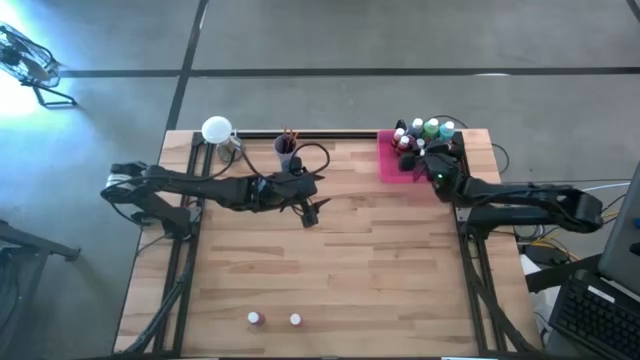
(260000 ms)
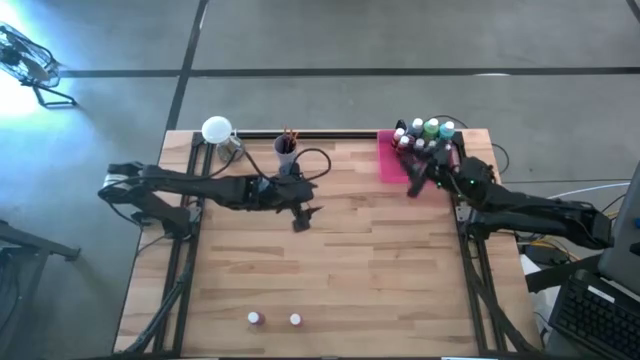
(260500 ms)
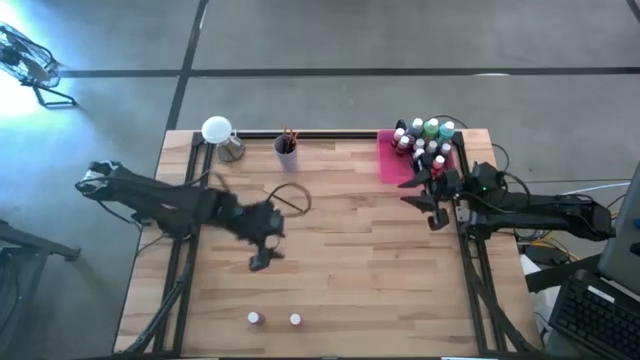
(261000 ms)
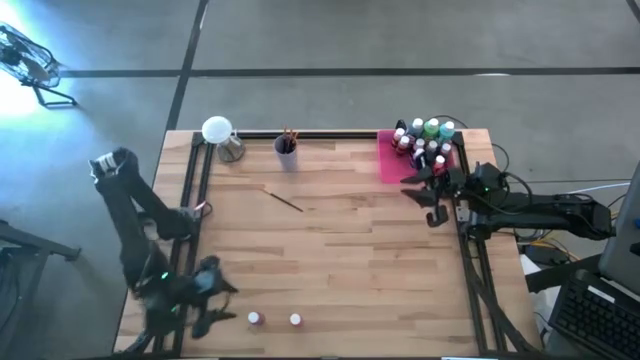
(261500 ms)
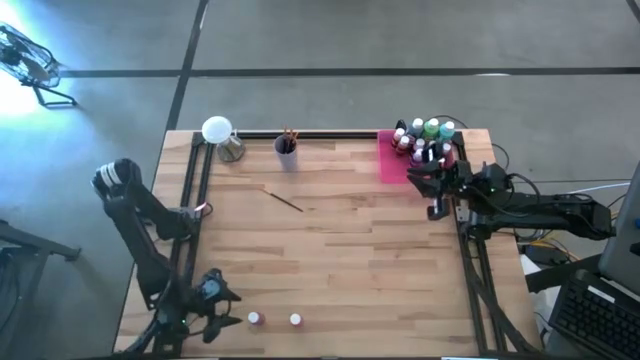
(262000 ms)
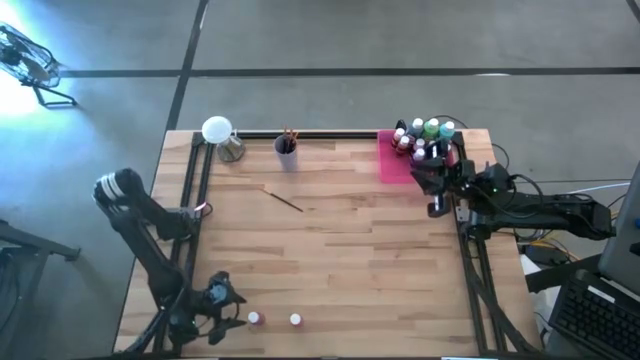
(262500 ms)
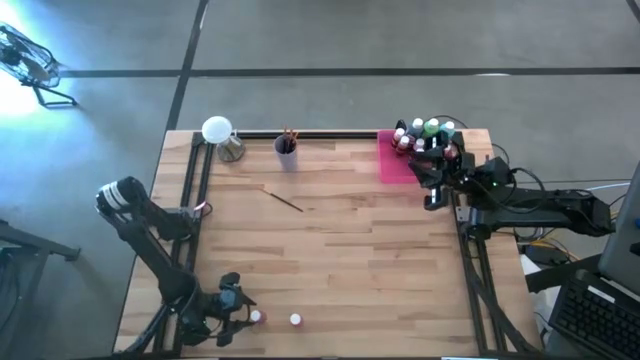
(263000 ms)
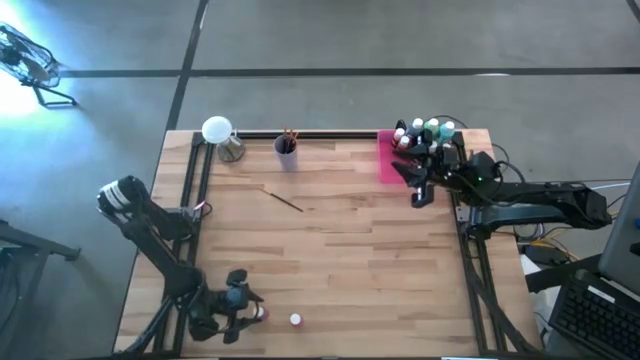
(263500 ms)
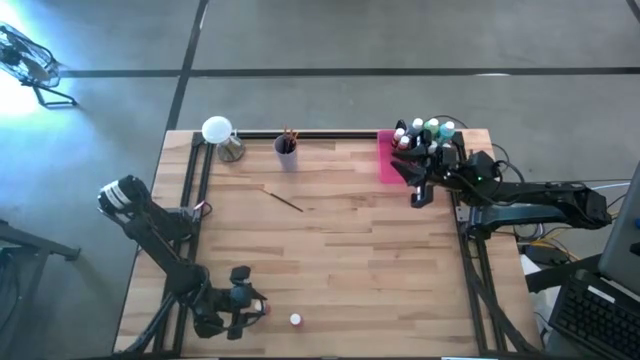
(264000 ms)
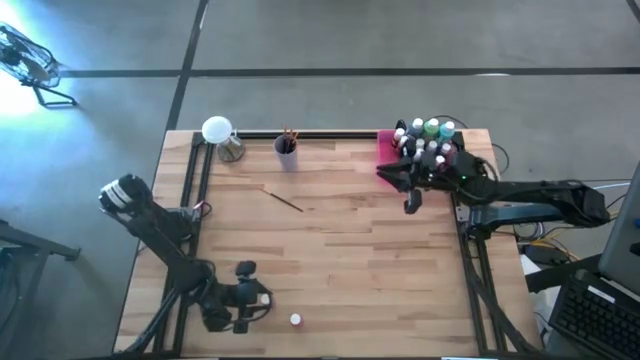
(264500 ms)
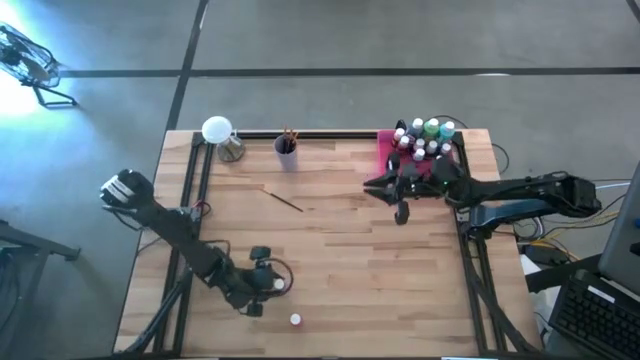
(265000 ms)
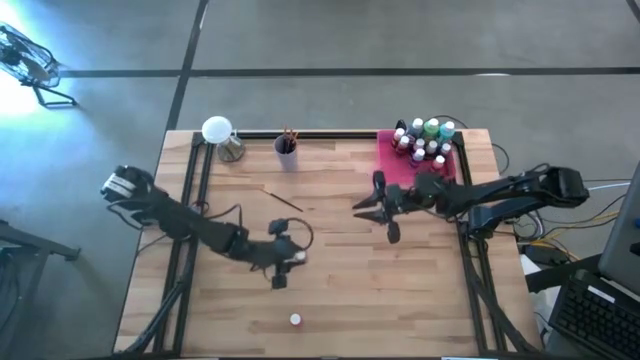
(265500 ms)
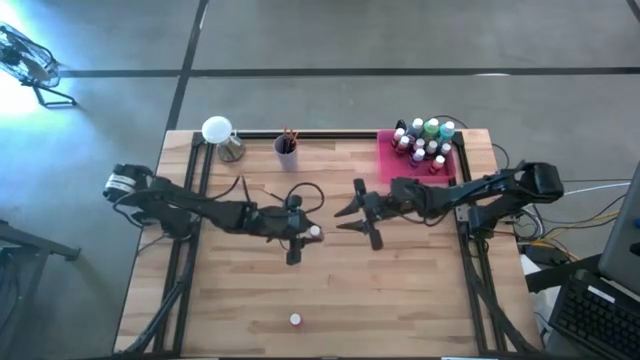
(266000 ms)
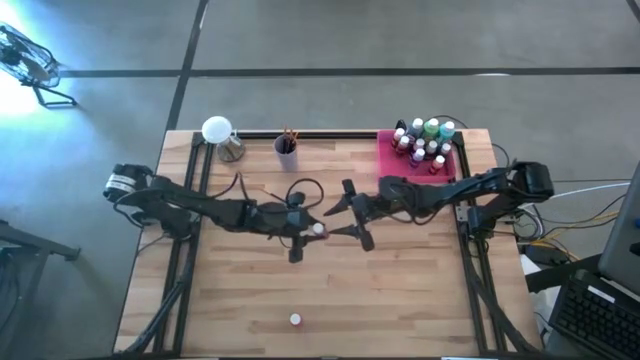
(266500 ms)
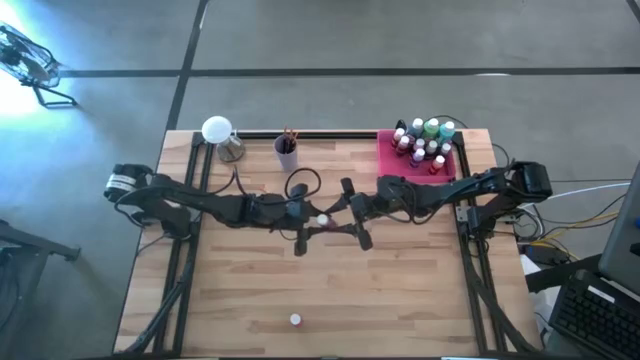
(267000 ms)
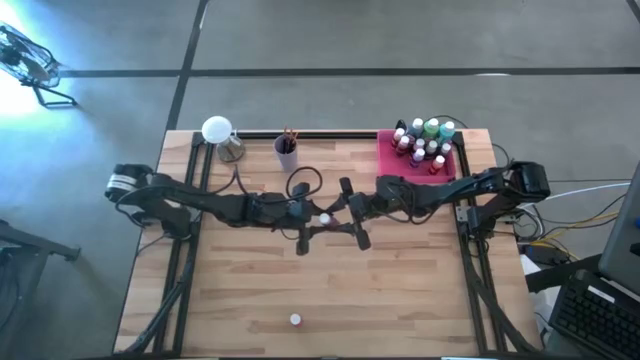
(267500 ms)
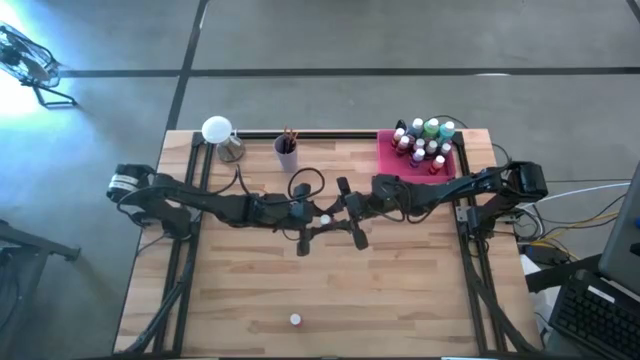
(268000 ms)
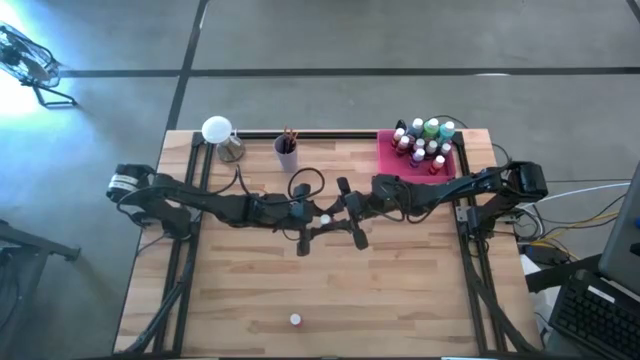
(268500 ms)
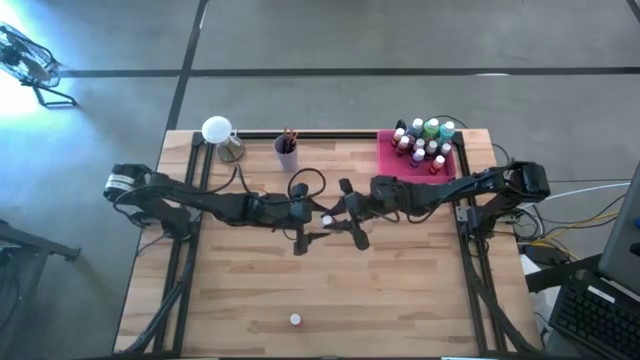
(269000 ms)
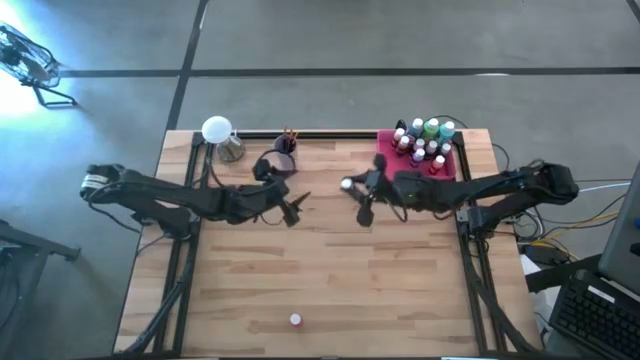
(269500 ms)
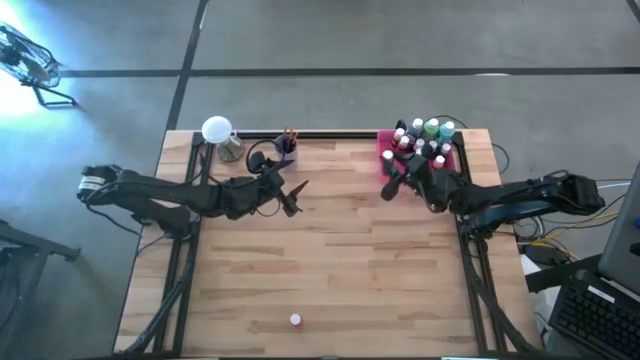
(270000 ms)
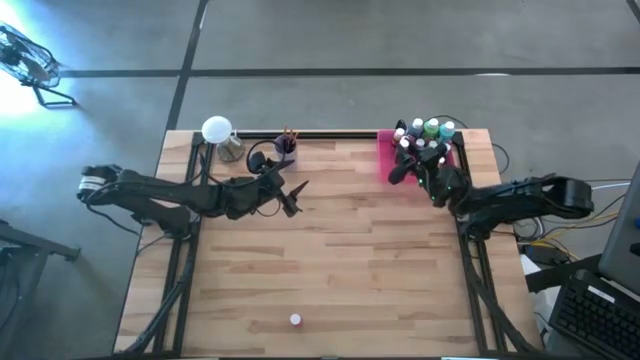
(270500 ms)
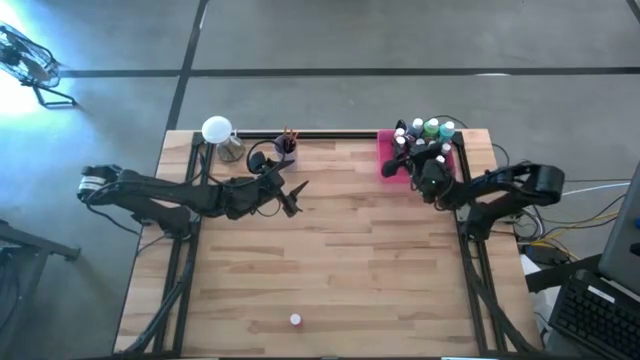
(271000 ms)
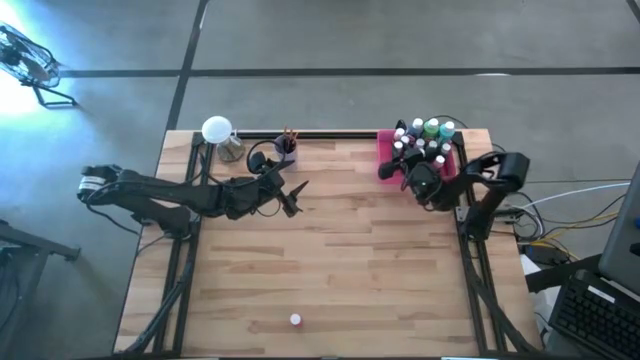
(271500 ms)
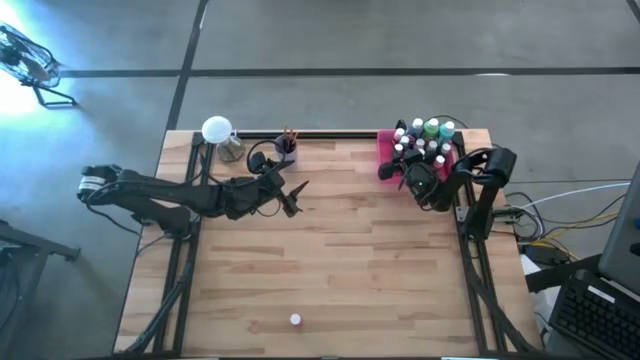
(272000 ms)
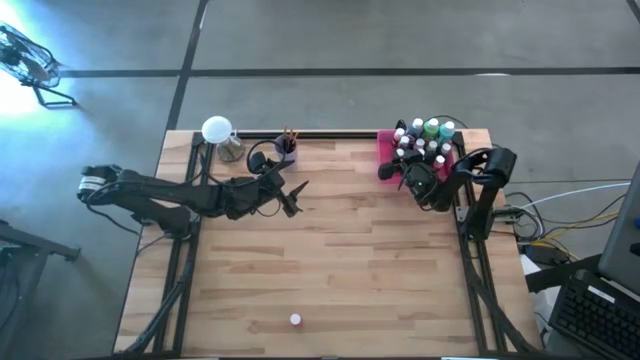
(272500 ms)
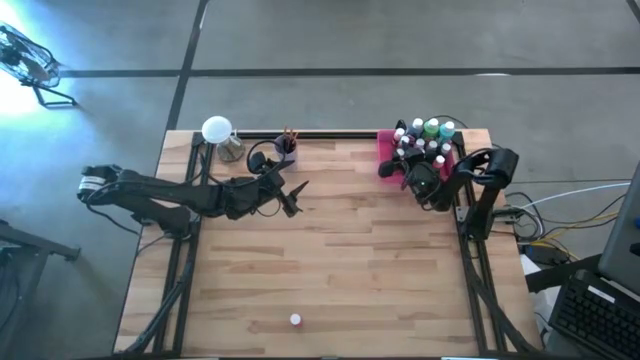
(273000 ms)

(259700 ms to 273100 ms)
Task: Pick & Place Paint Supplies
Put the dark pink paint bottle into the pink bin

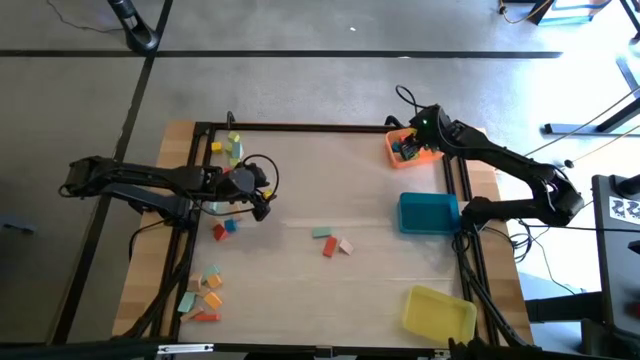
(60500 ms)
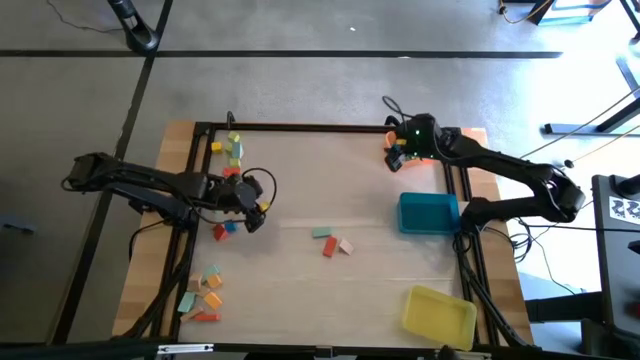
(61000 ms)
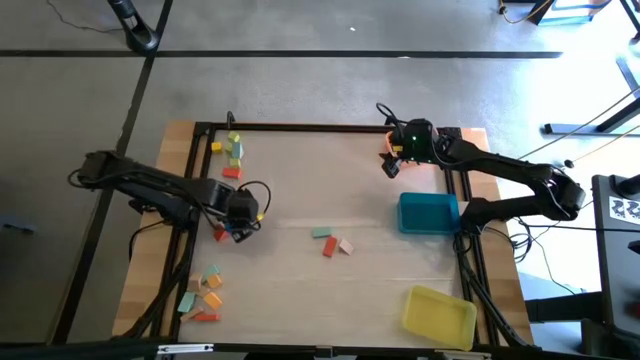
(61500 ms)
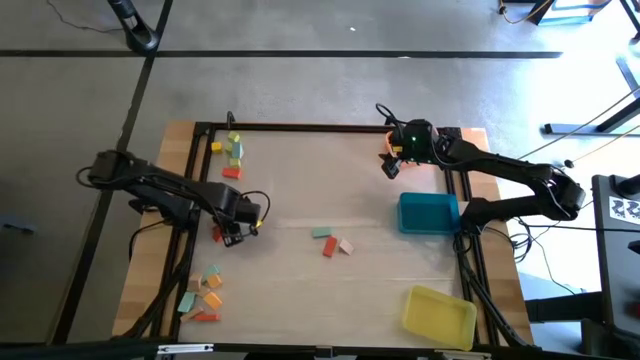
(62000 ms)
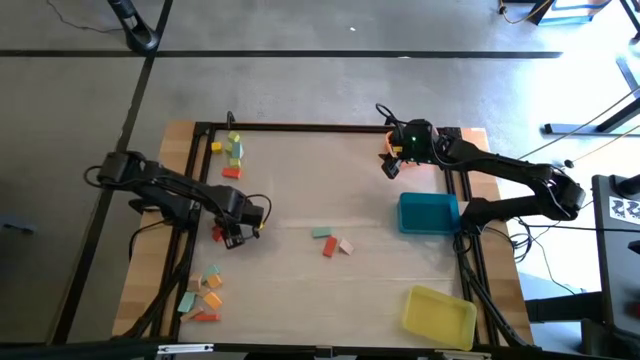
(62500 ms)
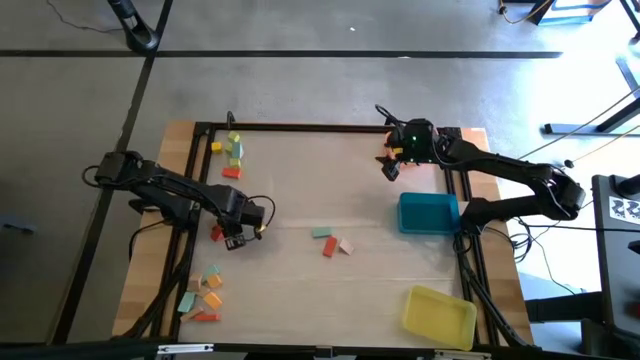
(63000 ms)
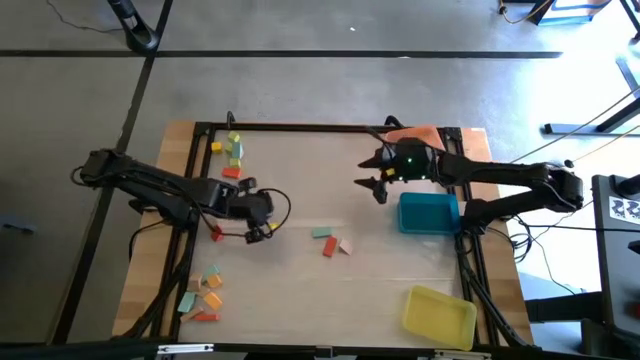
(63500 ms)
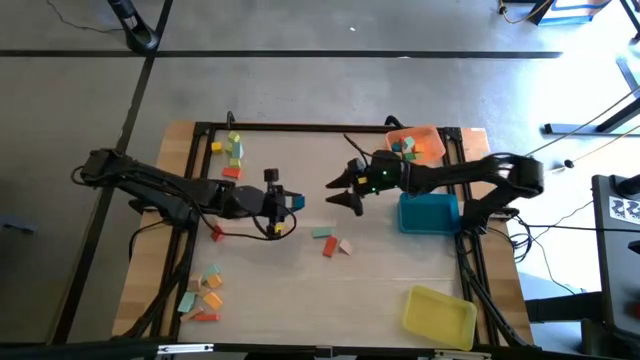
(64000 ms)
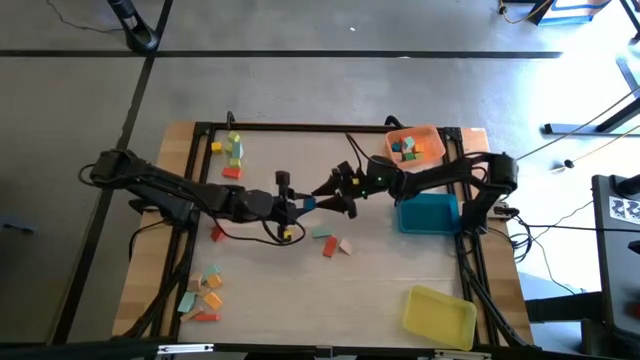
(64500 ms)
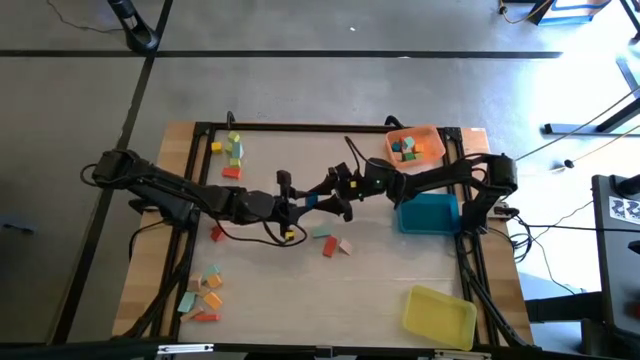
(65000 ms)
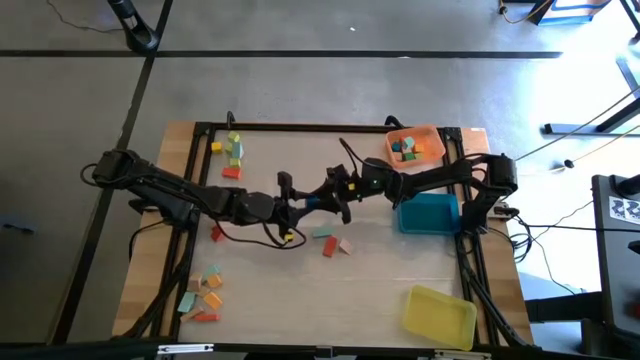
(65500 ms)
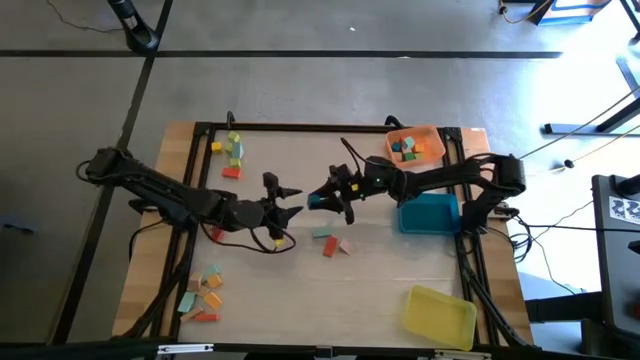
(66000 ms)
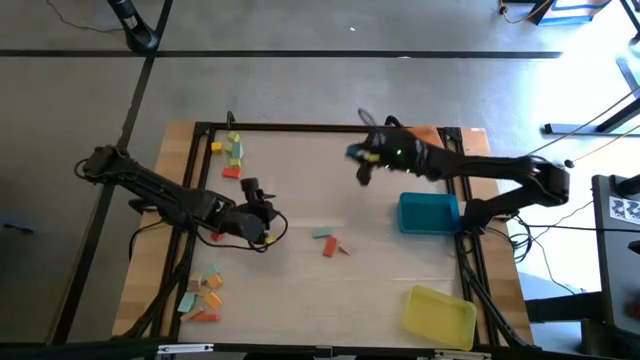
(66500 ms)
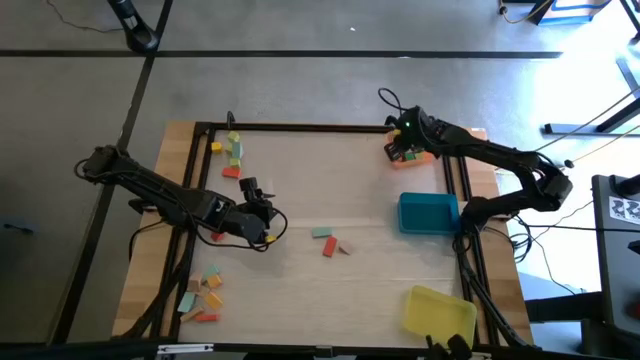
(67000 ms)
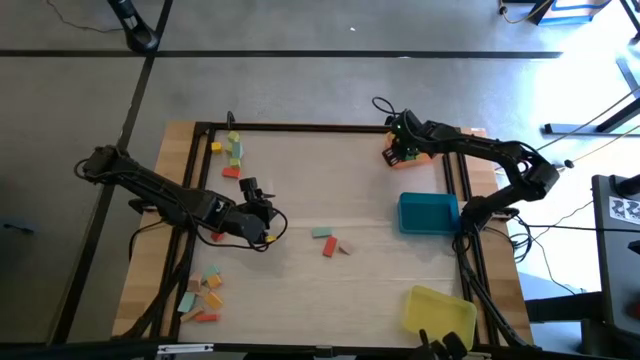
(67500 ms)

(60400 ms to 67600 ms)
Task: Sort blocks by size
Put the blue cube block into the orange bin
